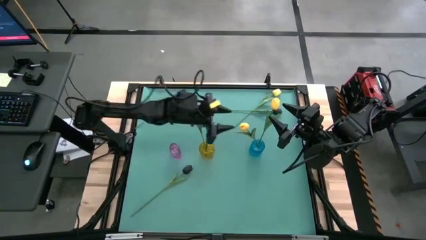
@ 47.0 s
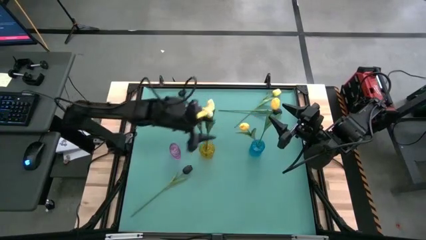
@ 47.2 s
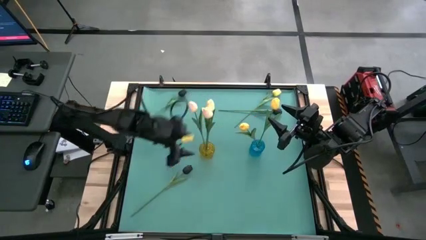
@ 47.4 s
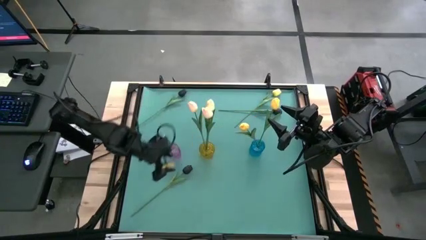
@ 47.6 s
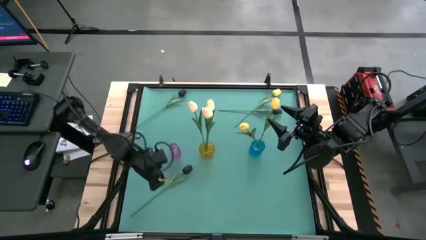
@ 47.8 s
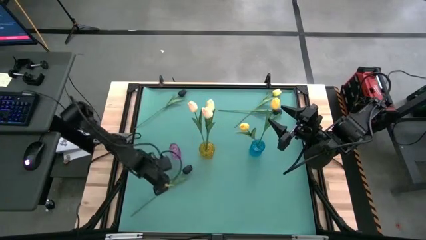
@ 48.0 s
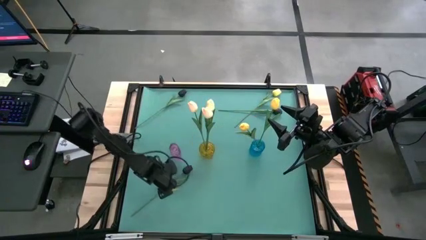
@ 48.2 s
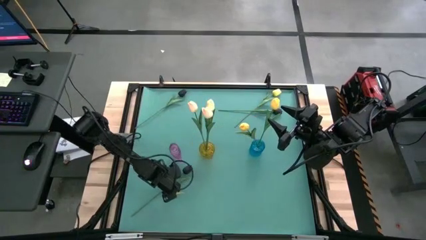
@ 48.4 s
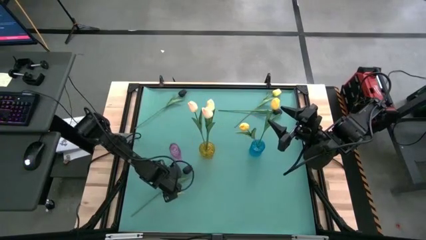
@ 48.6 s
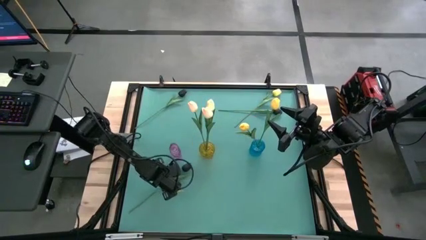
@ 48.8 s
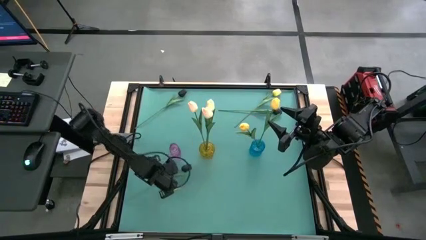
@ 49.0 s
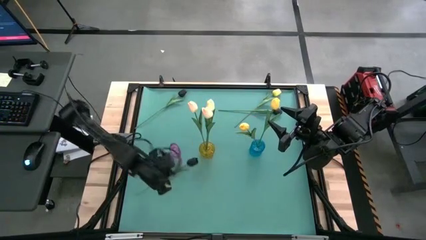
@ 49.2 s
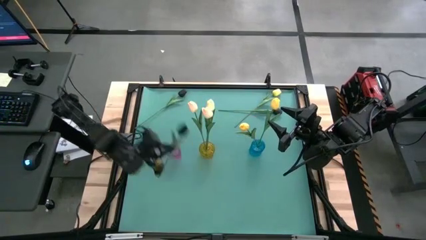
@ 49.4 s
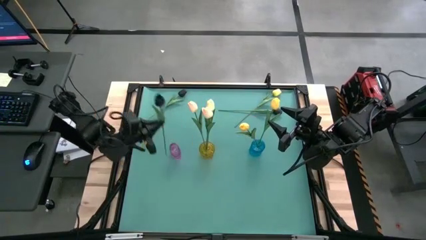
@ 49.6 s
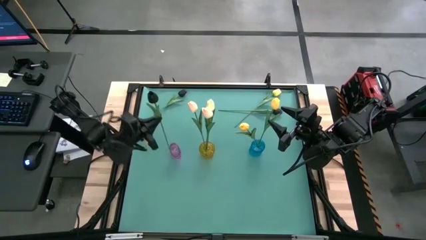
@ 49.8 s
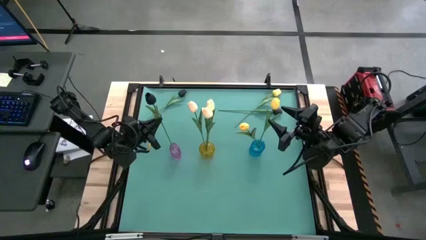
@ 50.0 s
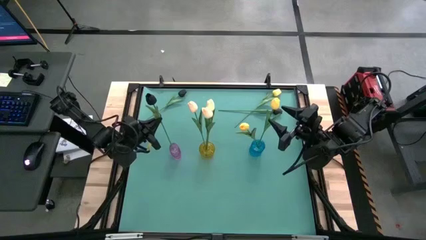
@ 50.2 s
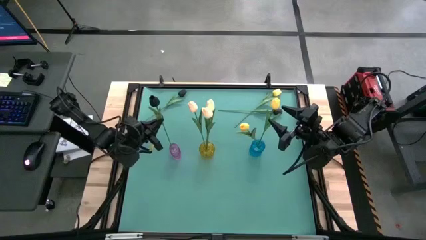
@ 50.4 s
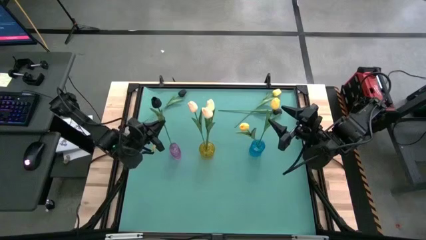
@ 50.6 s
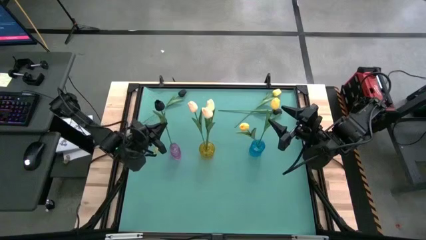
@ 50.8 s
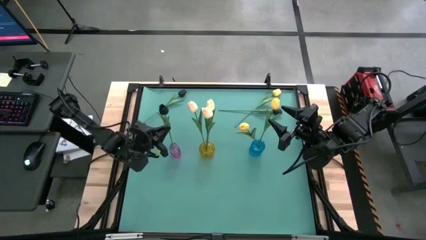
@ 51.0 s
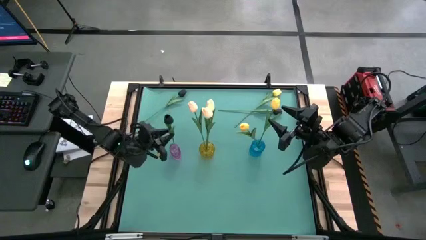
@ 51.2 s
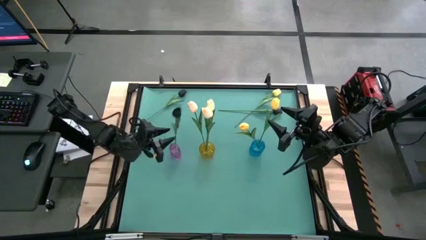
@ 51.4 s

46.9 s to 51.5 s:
Task: Sort flowers into vase by color
Put the bottom left black flower into the purple vase

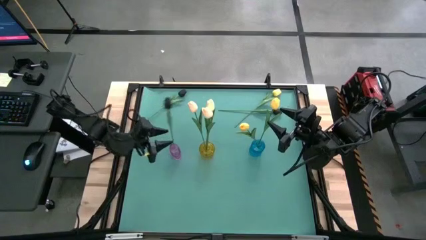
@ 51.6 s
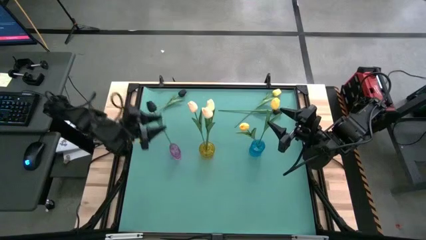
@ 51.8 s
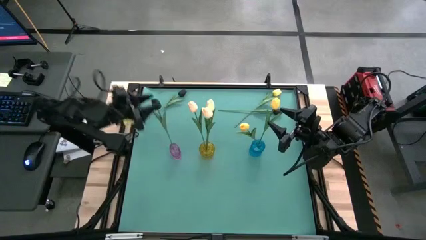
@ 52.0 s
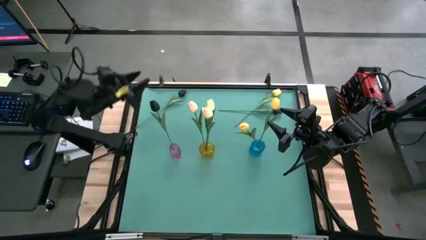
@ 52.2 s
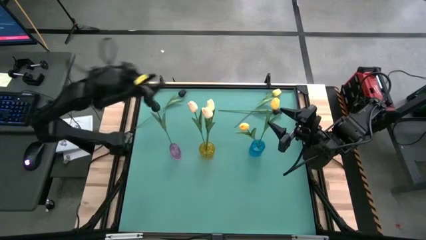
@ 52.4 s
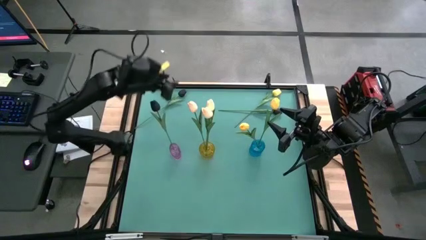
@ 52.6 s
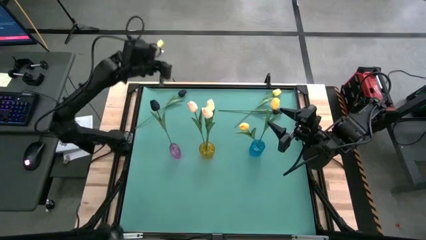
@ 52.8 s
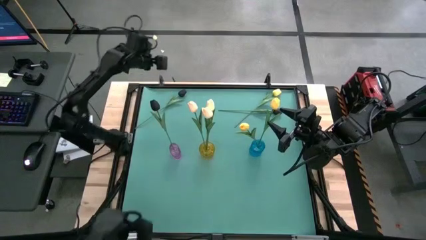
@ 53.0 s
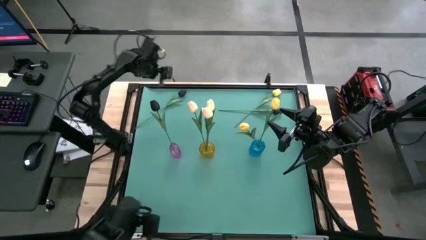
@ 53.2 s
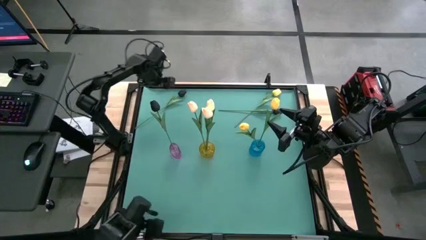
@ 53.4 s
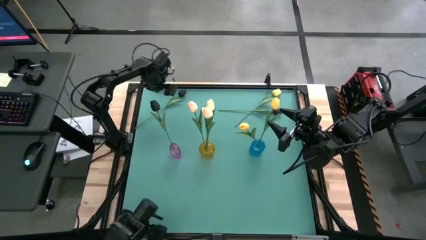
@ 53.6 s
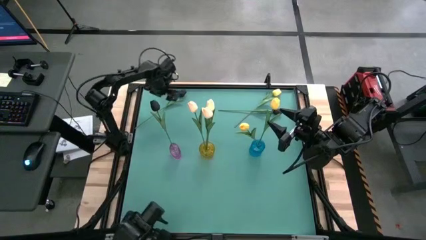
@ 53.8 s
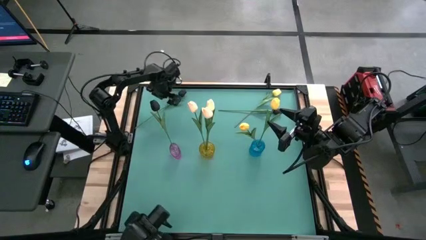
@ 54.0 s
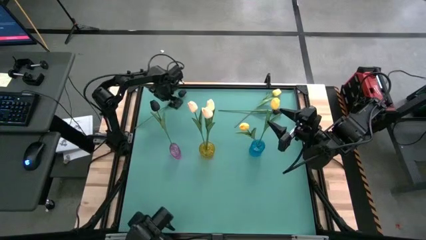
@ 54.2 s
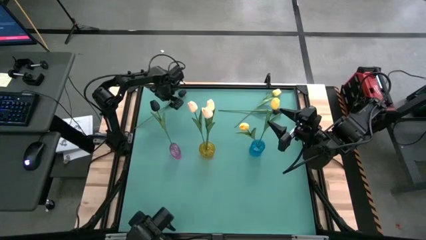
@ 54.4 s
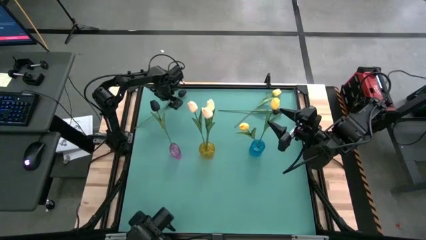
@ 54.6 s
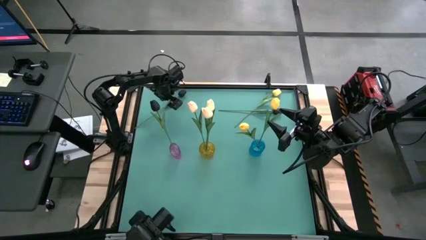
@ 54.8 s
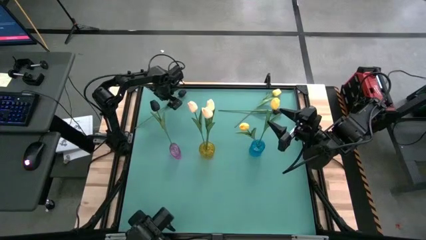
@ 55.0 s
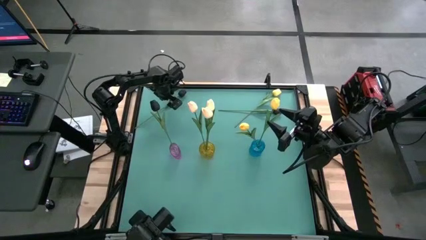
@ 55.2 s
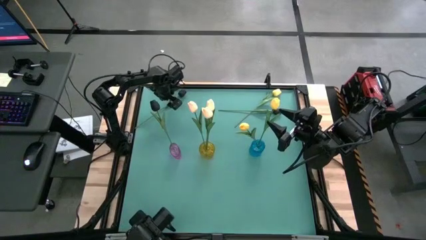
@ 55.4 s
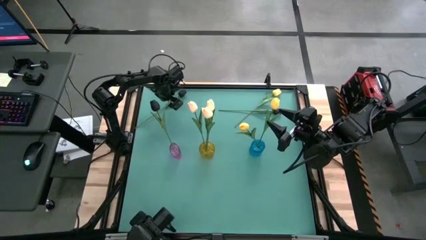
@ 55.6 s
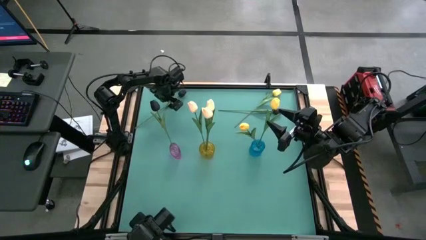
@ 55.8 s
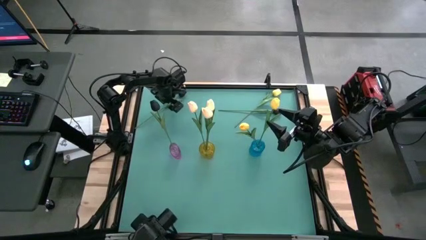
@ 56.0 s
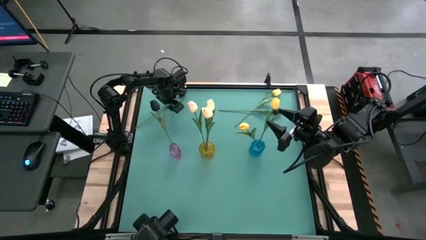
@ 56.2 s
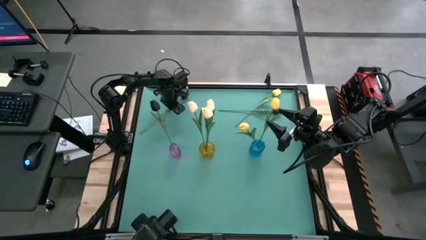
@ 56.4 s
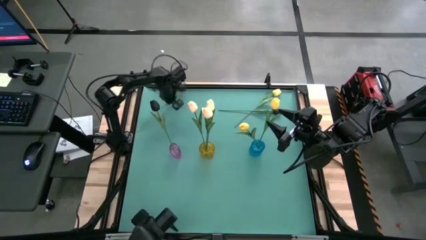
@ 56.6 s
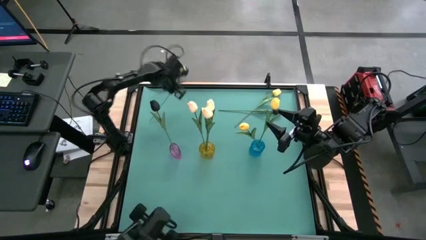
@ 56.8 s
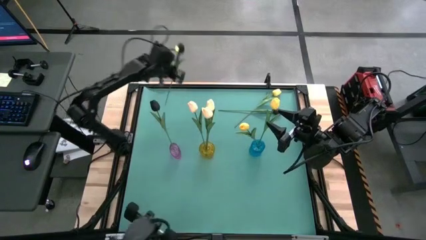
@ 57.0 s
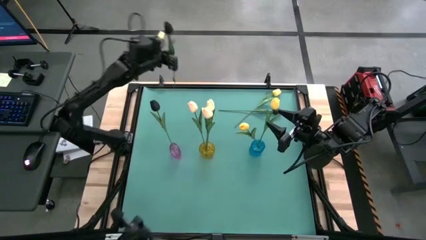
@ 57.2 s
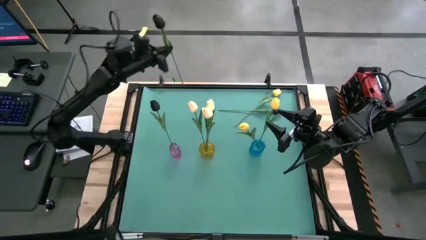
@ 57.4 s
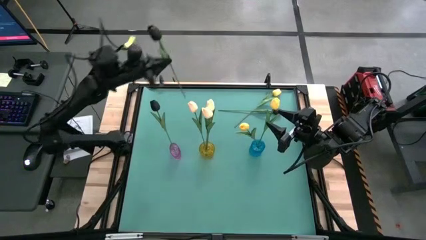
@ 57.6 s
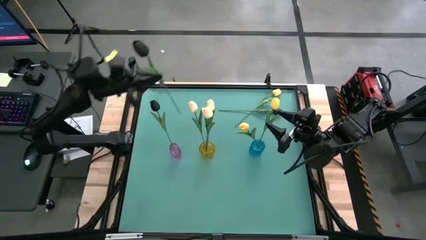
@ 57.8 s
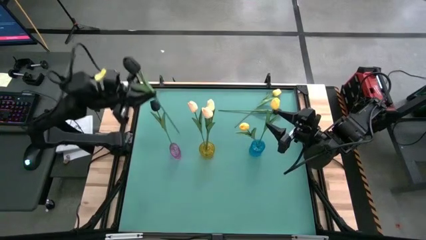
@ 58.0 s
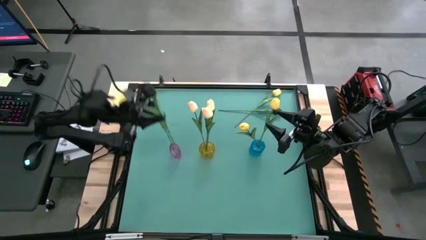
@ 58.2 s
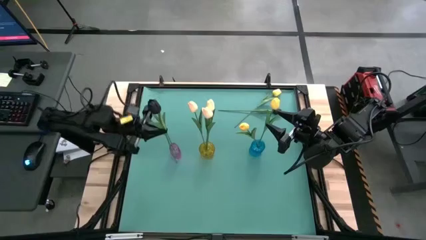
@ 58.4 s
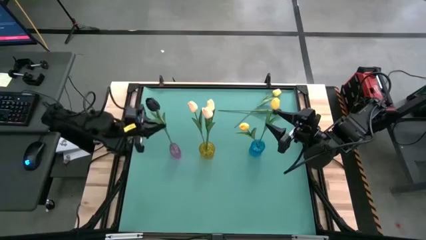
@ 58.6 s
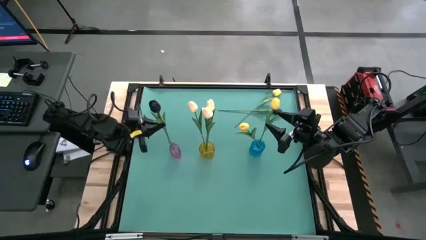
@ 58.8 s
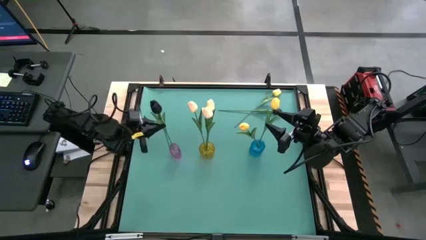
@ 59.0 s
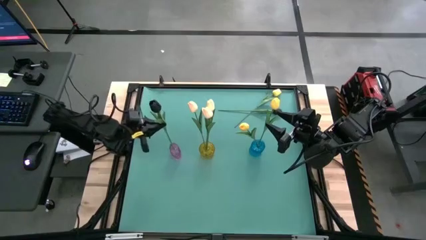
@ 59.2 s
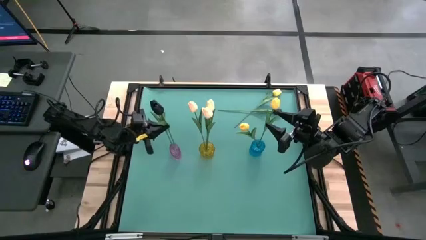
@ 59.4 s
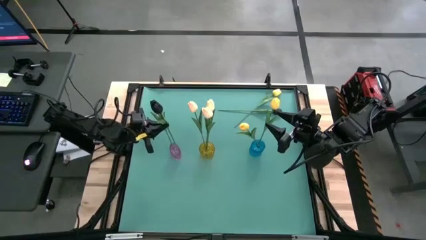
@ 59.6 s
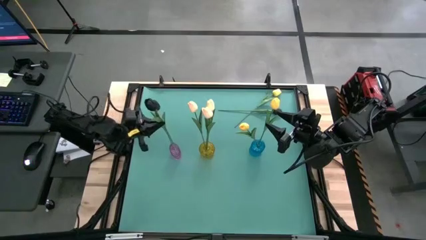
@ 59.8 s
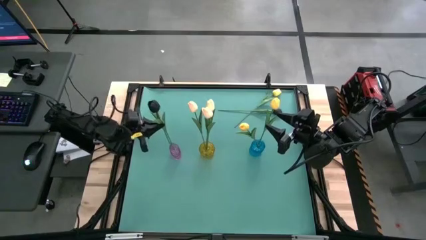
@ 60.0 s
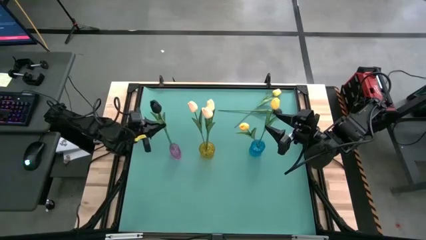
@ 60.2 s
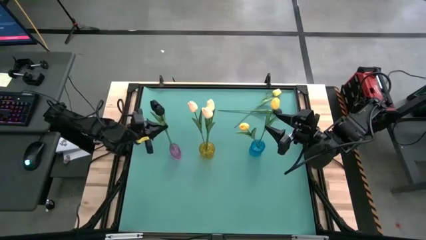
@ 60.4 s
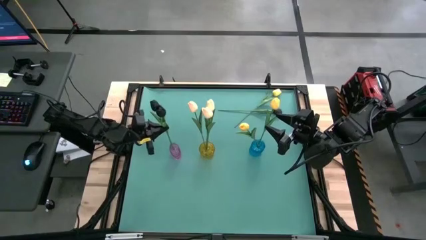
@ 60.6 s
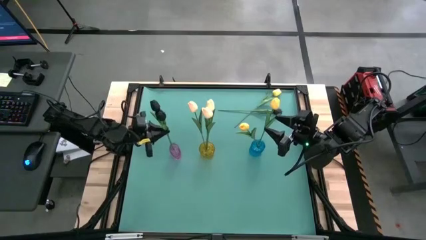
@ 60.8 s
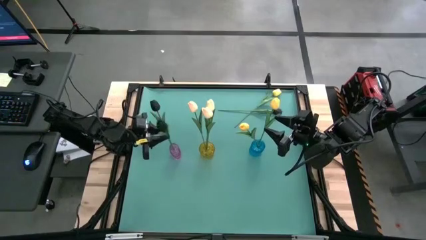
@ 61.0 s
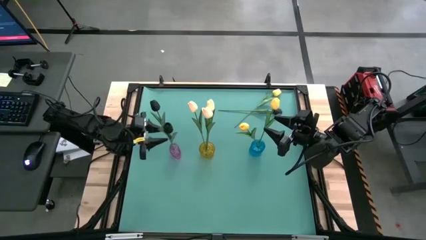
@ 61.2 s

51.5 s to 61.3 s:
Put the left black flower into the purple vase

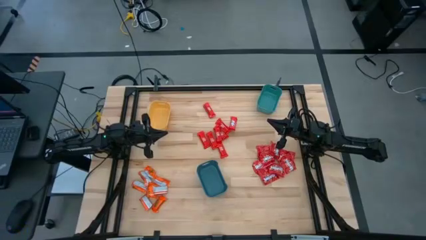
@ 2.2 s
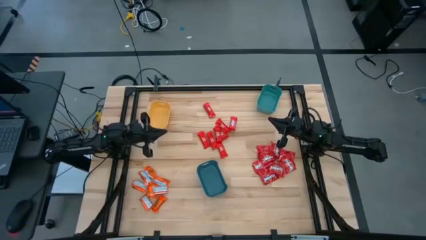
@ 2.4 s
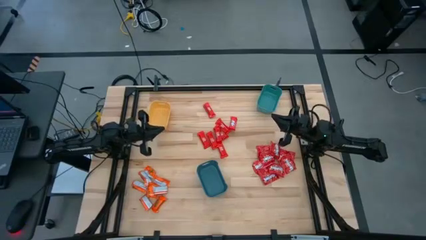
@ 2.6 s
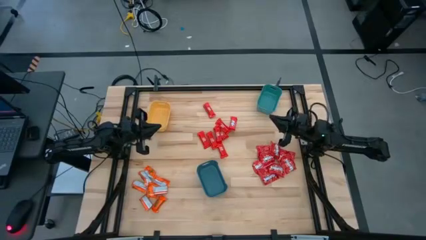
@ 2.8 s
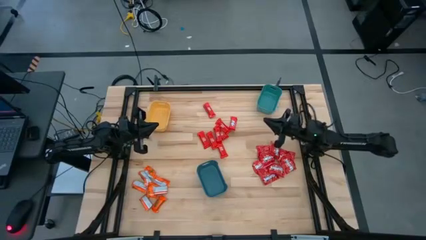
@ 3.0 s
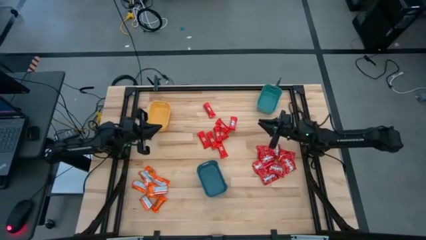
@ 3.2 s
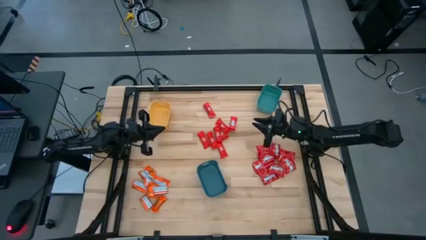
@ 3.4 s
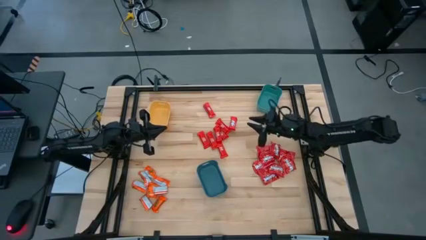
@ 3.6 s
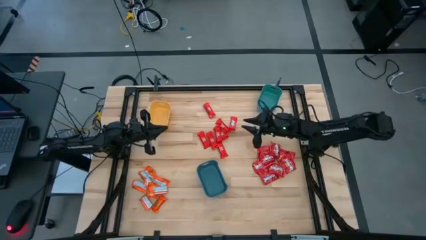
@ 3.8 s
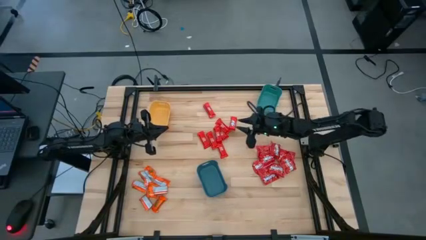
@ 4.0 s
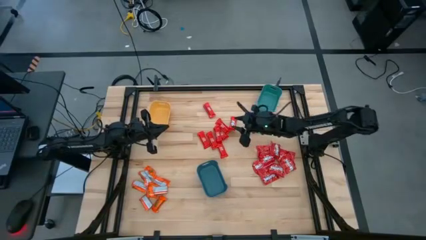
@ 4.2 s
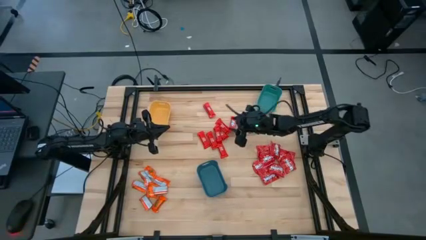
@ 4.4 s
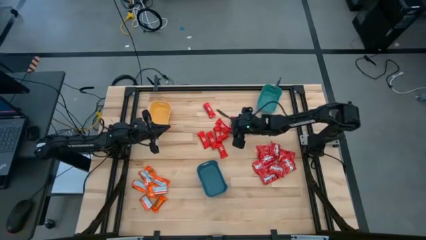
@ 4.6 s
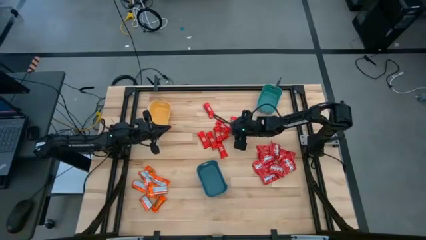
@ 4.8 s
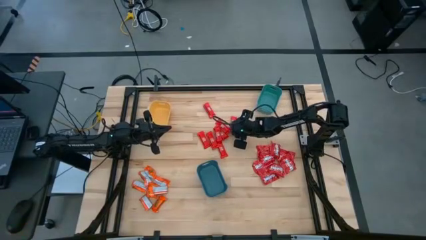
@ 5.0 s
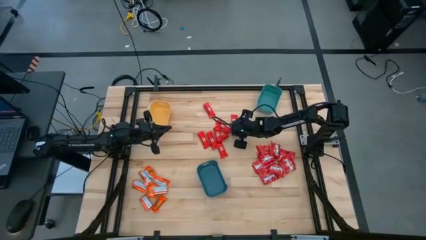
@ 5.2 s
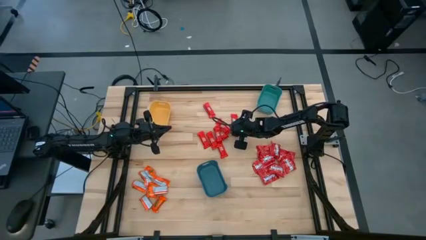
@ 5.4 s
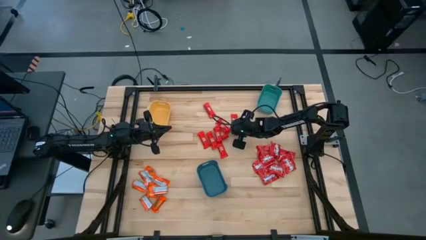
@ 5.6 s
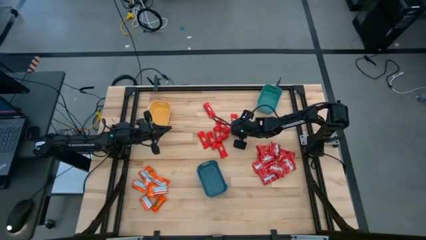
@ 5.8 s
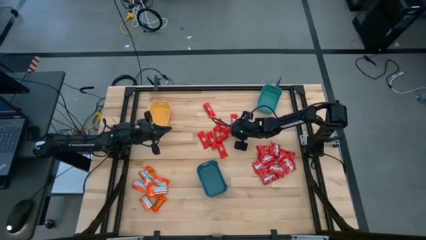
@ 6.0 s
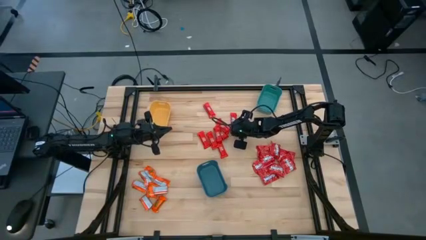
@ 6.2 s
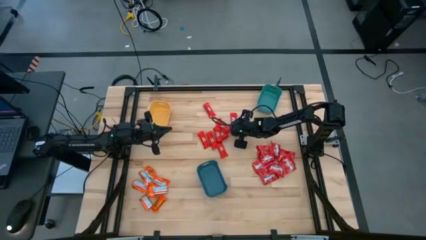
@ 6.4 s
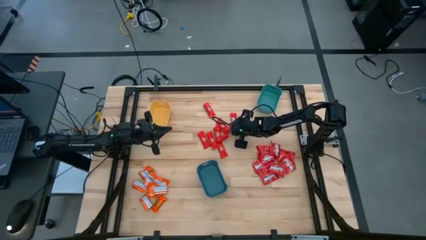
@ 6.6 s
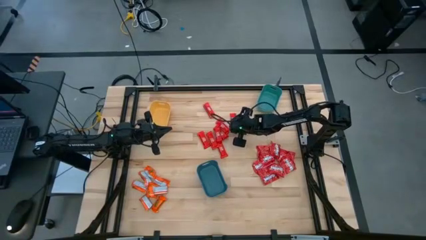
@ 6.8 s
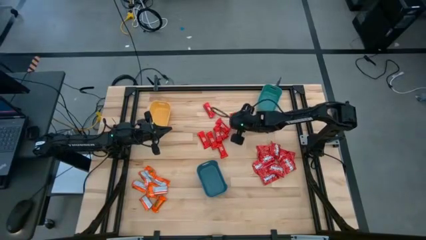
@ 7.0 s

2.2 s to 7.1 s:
Task: Sort candy
Put the red chocolate bar into the green bin
